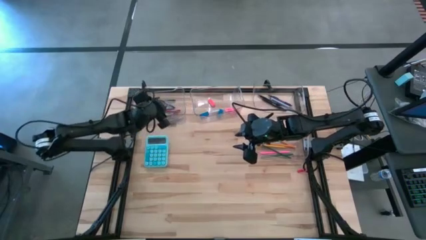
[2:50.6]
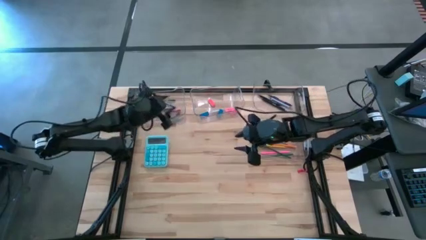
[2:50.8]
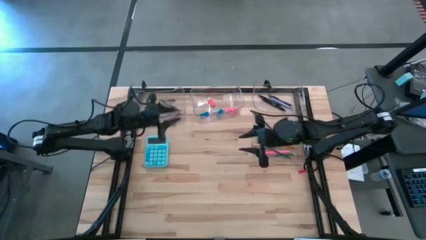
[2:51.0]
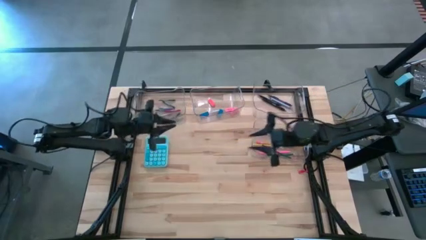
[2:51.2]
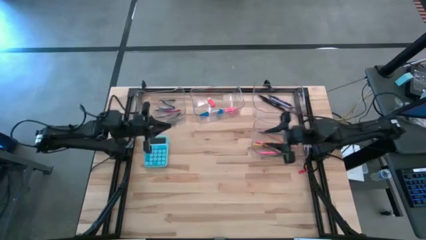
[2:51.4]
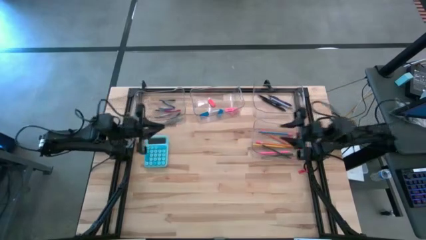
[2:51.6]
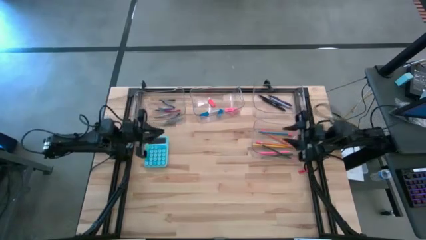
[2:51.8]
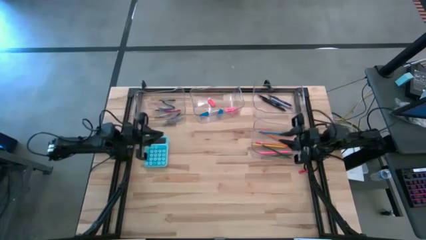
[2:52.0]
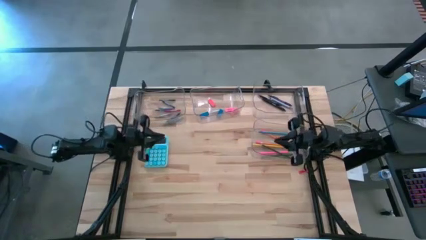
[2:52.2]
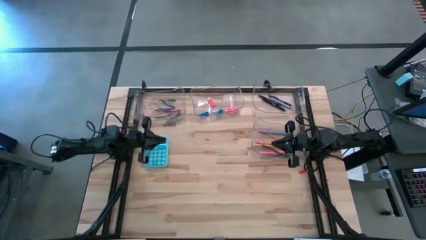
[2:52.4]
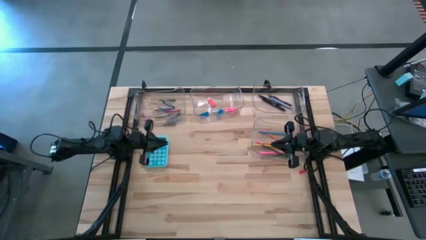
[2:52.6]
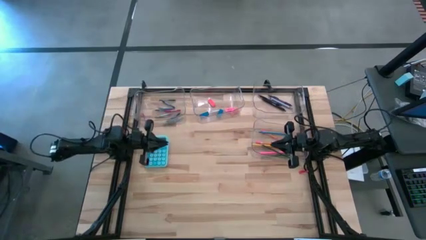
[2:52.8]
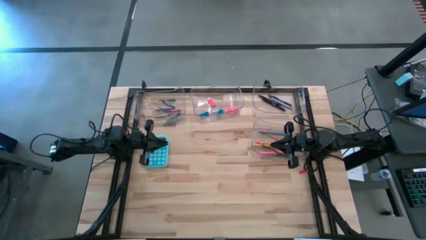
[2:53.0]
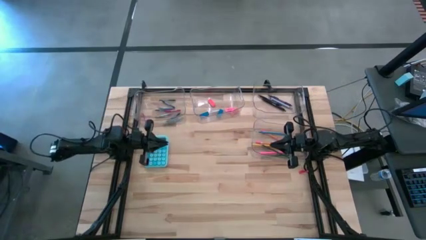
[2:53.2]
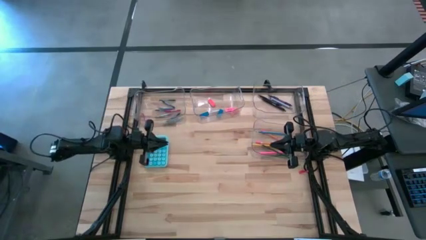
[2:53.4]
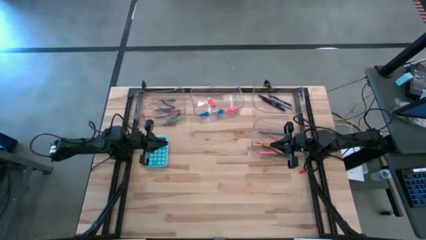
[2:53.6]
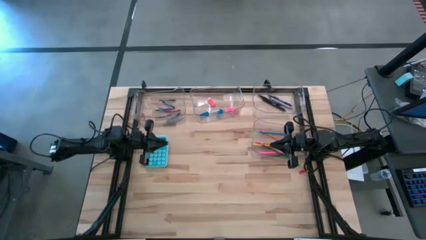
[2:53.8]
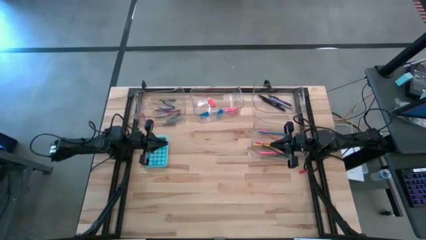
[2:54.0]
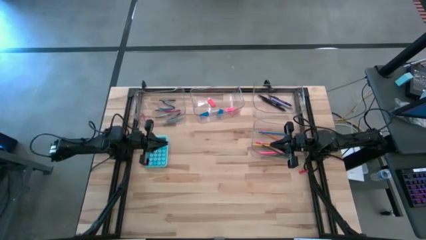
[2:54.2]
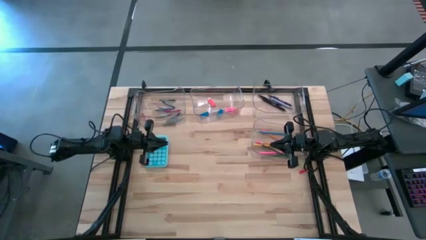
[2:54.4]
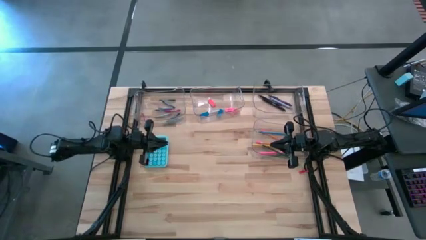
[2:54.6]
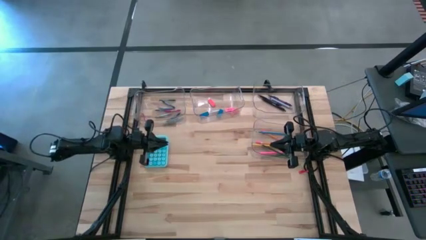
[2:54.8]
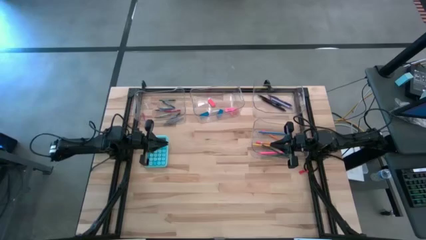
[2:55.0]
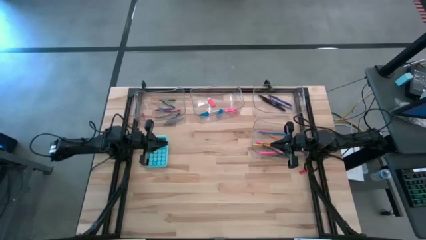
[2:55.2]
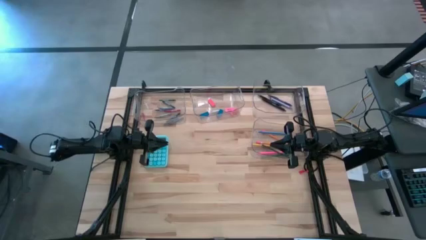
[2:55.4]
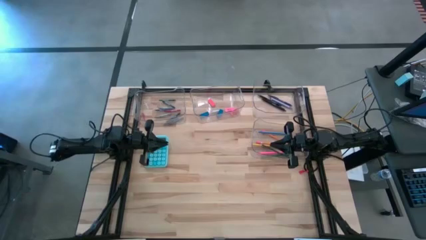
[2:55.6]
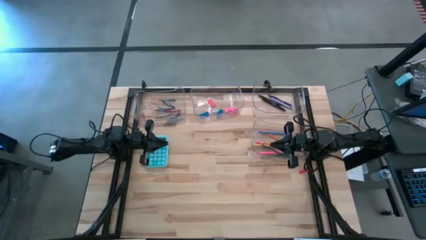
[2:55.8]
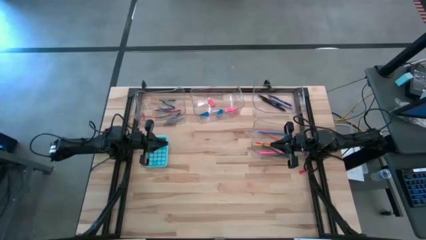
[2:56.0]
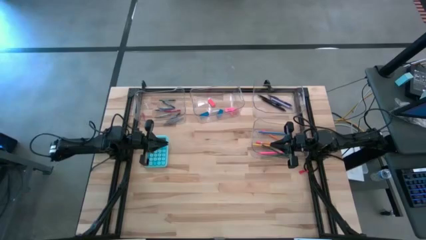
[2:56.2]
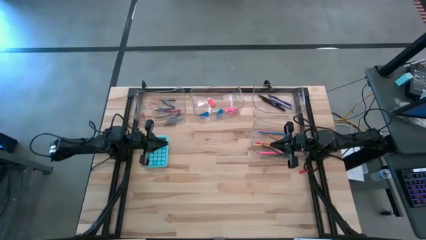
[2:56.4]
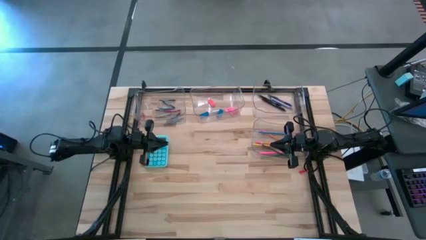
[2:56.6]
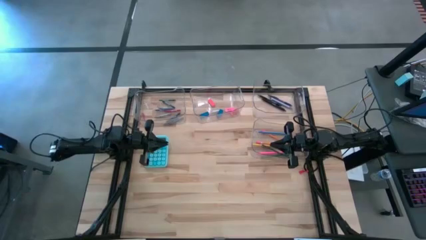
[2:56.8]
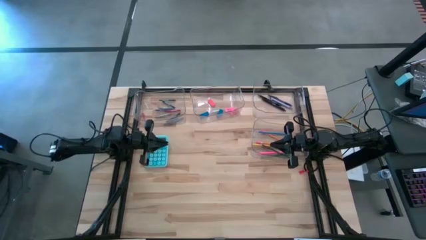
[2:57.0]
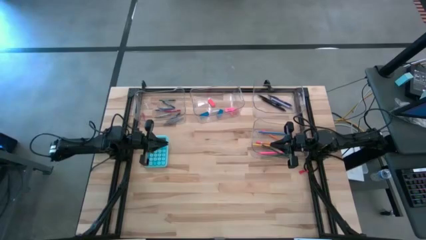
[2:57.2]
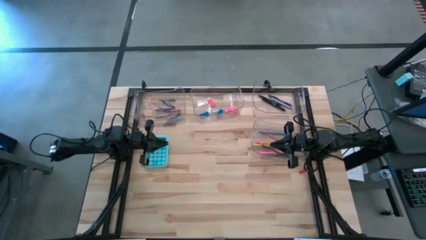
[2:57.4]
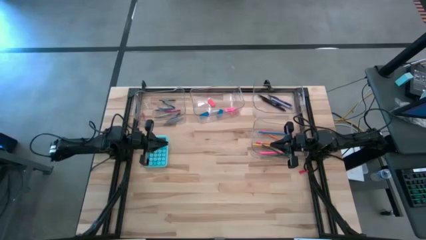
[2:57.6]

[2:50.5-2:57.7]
Task: Sort crayons/erasers/pens/pencils in bins
Return to Home Position

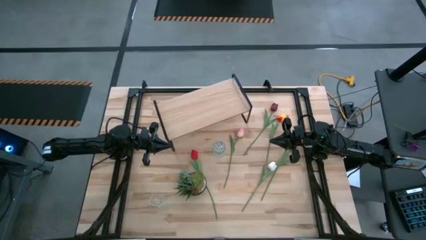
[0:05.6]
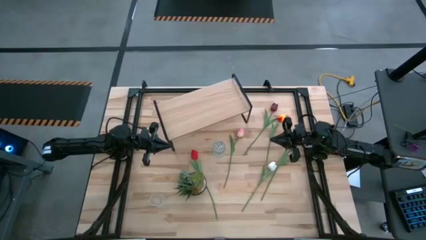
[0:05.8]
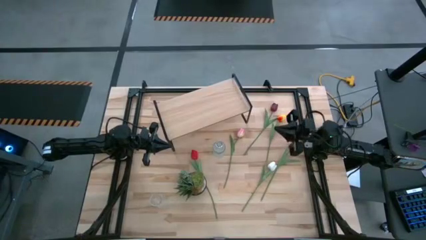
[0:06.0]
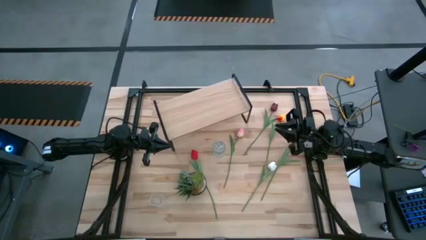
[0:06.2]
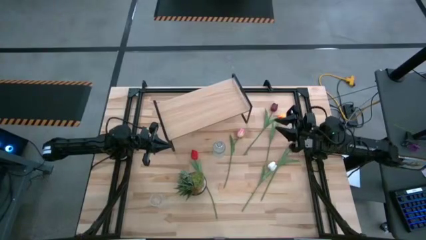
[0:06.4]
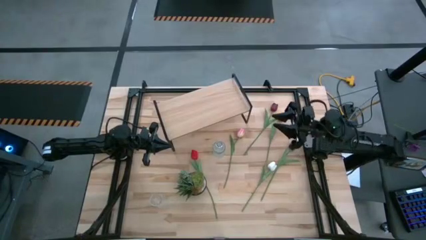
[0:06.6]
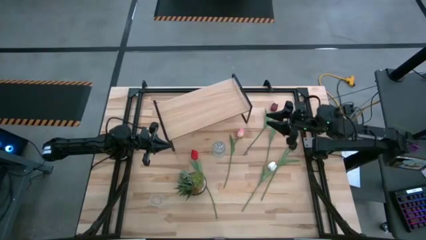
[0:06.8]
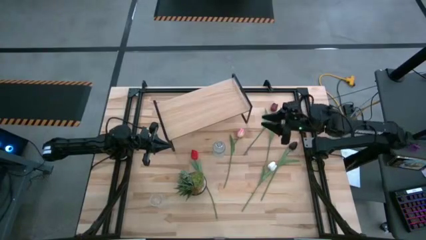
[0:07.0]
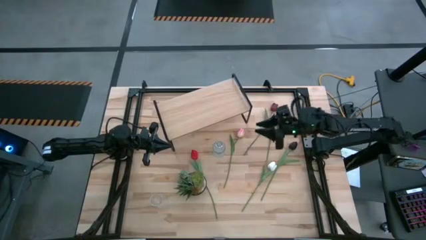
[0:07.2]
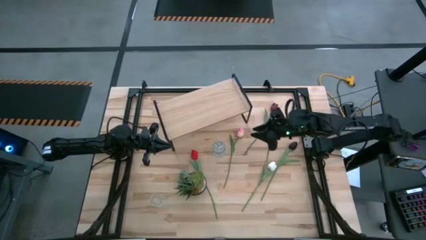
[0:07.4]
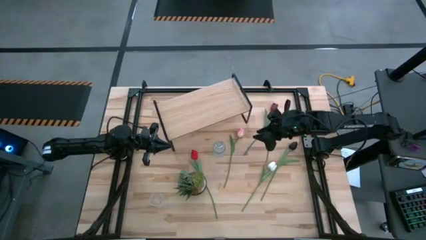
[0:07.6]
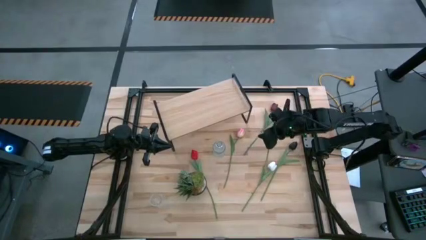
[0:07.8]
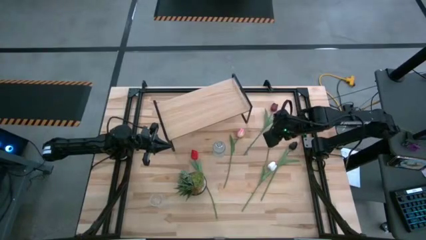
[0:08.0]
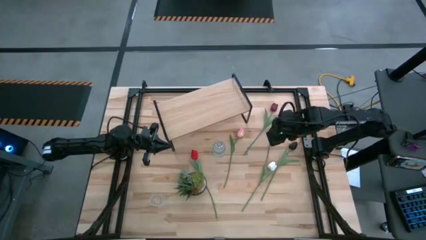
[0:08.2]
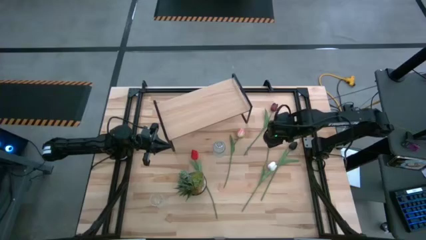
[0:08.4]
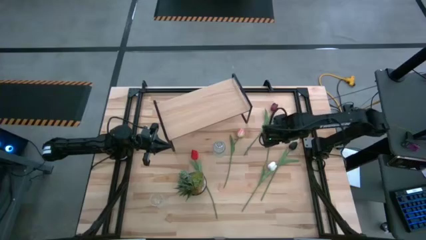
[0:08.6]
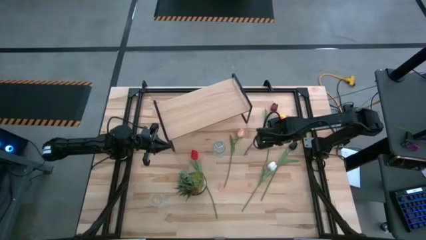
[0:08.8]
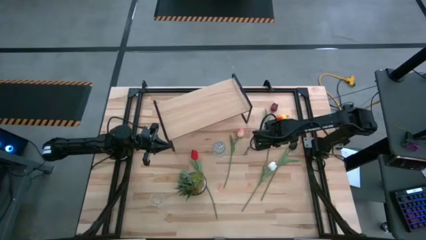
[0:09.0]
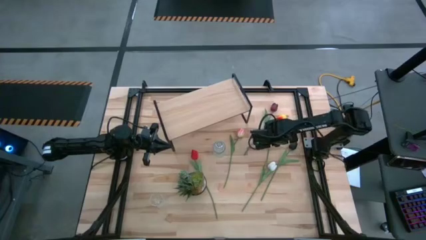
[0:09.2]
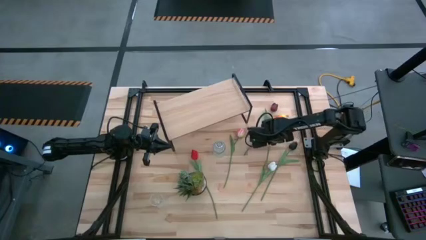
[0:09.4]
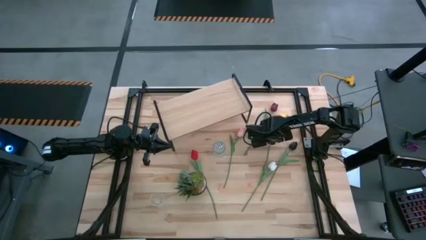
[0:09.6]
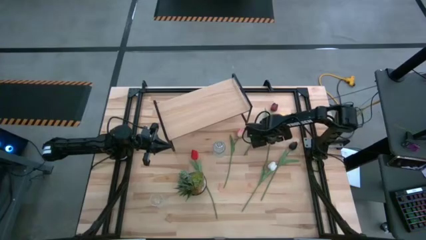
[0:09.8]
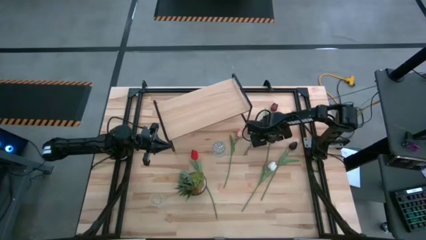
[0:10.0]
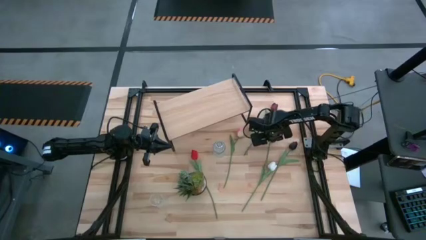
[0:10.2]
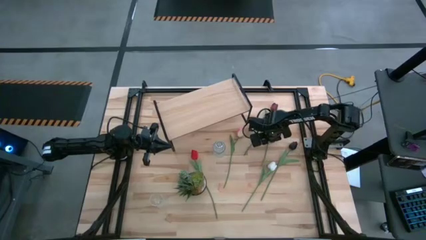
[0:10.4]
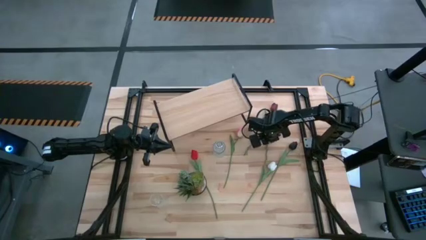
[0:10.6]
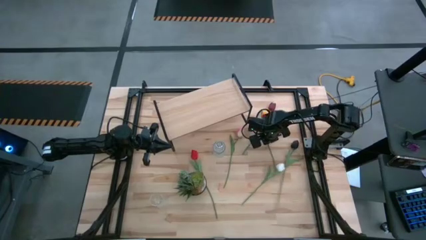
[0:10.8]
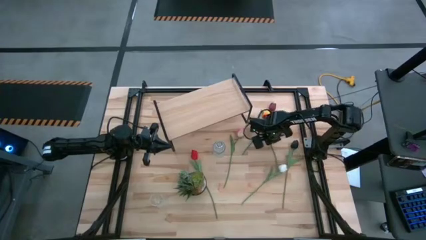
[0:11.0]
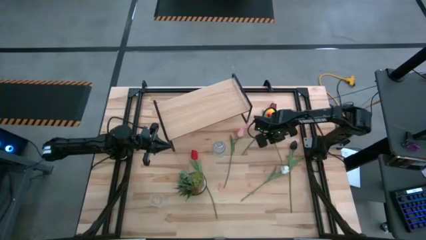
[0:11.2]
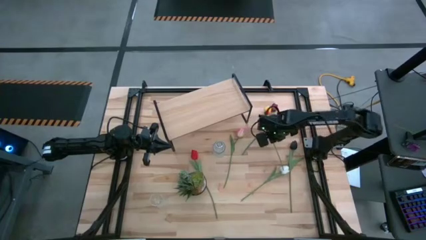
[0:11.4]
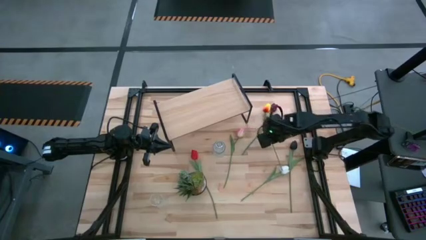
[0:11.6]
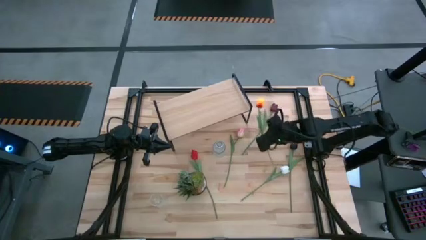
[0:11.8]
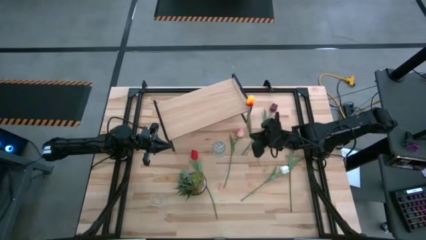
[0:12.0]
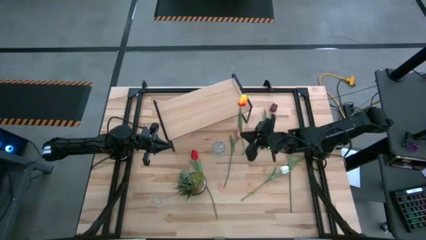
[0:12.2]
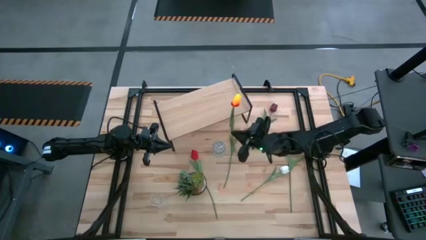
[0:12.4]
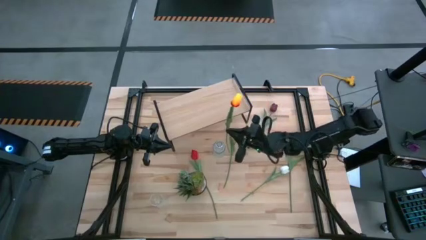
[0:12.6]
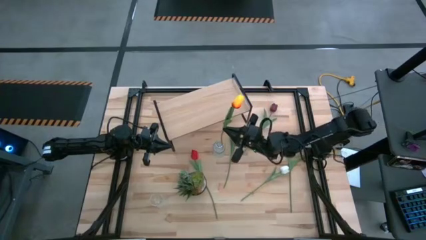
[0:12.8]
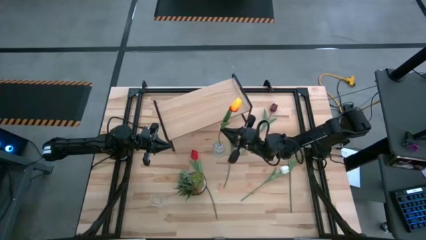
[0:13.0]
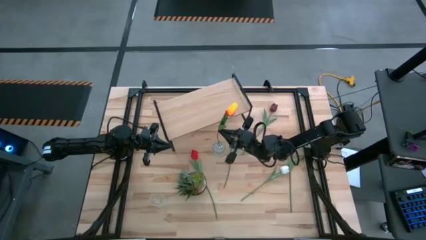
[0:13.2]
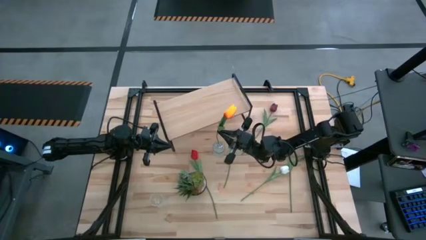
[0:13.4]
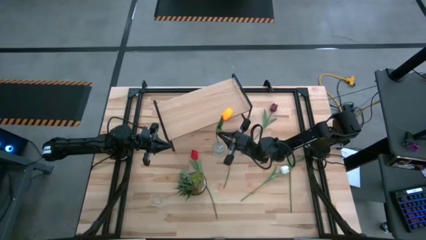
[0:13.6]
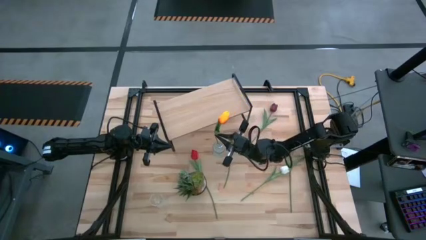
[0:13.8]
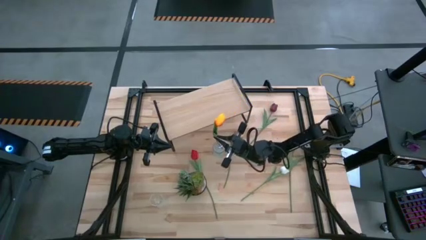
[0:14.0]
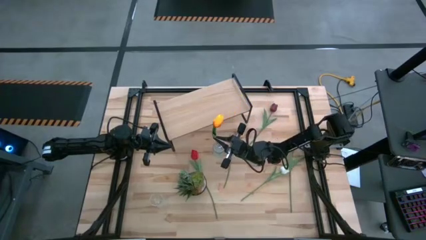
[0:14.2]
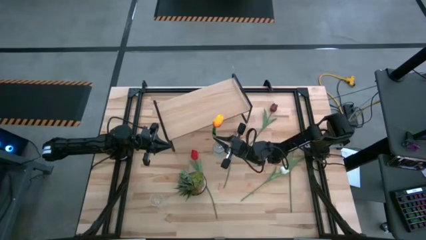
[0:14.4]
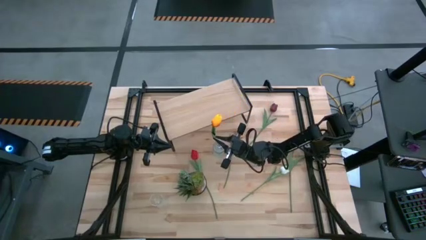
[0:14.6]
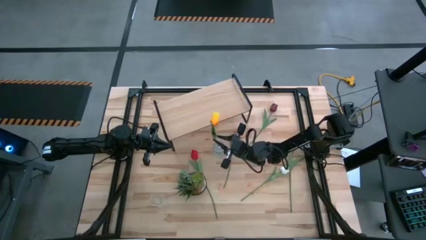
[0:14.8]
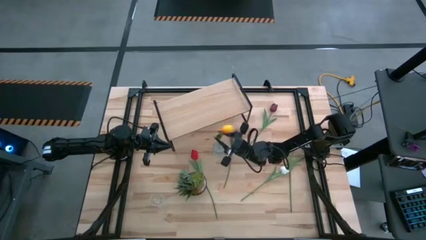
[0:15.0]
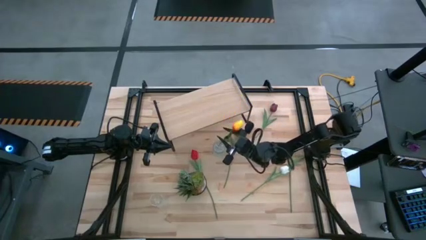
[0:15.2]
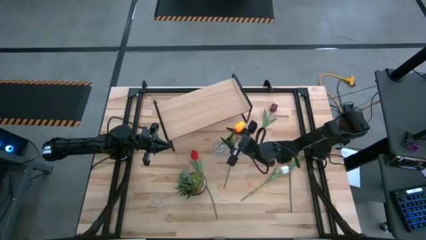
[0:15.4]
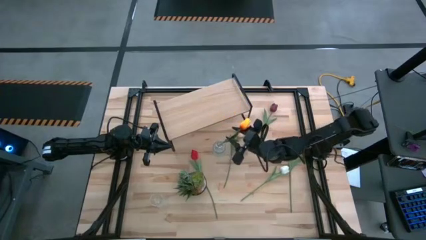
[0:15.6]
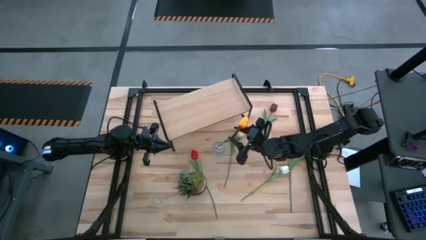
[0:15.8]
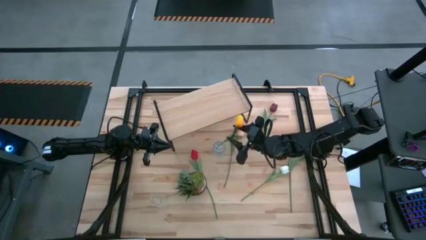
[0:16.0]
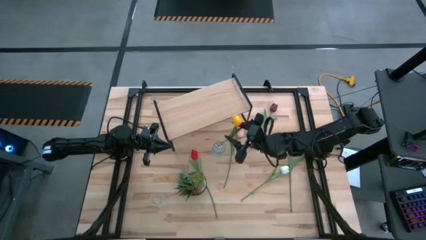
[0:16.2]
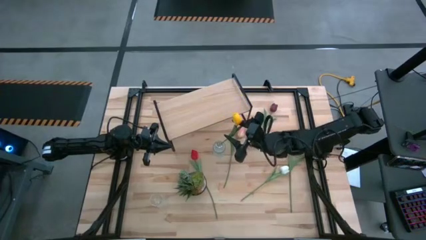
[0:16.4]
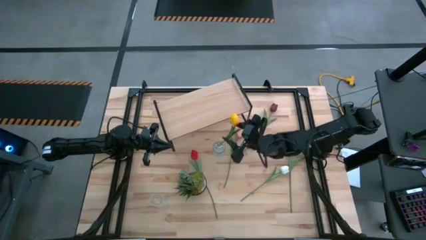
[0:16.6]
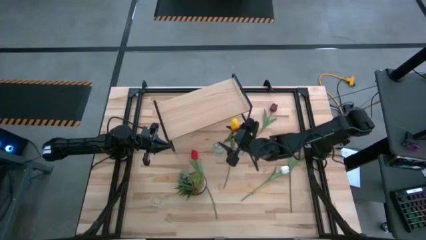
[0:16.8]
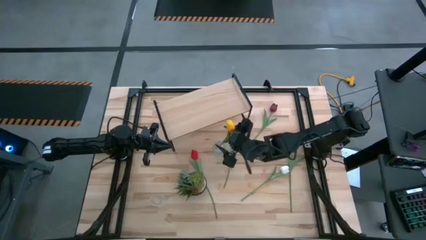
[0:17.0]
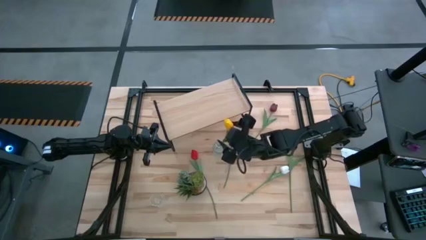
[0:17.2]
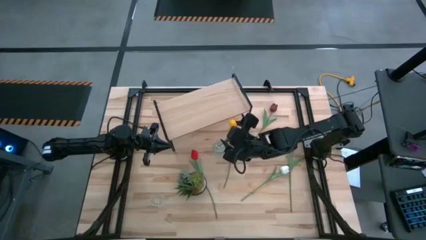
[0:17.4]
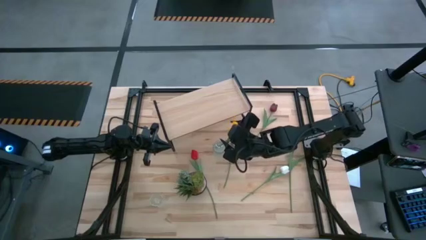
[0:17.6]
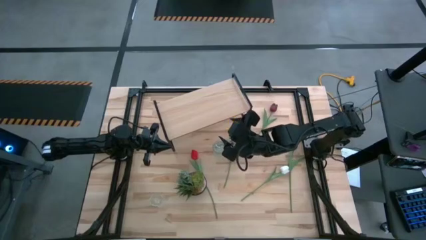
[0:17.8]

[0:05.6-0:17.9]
Task: Pick and place flowers into a vace then onto a shelf
Put the orange tulip into the top transparent vase
